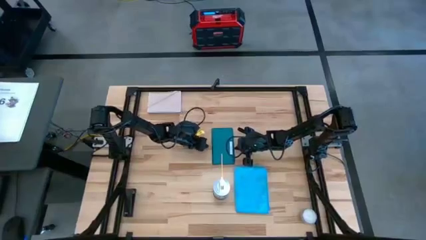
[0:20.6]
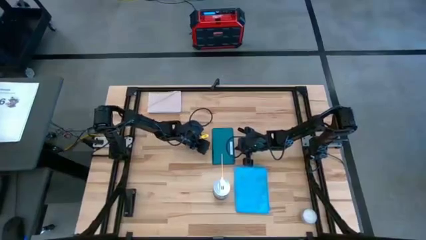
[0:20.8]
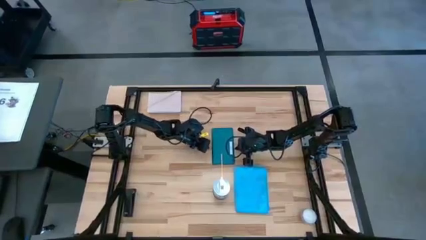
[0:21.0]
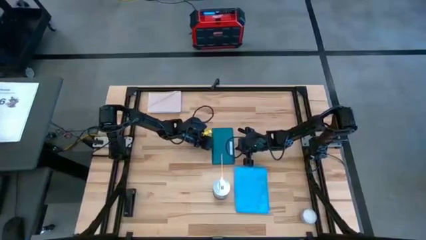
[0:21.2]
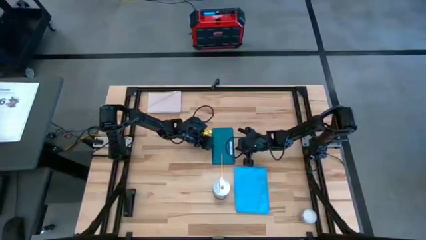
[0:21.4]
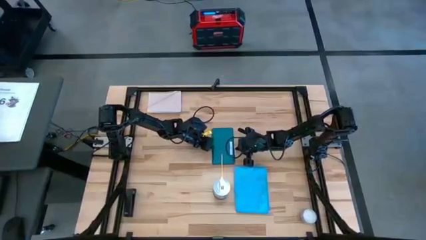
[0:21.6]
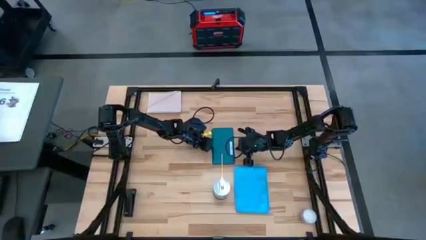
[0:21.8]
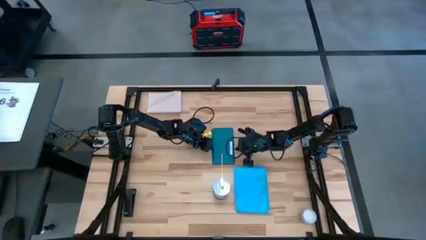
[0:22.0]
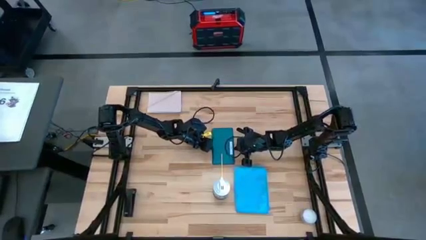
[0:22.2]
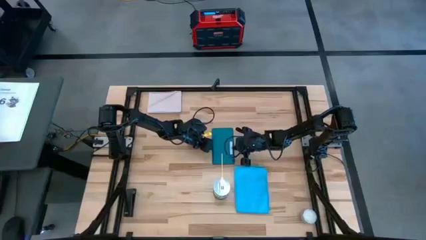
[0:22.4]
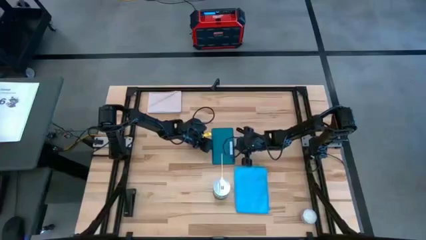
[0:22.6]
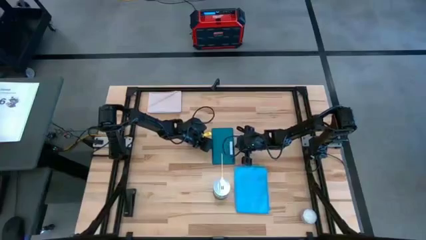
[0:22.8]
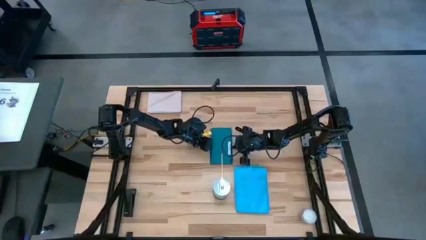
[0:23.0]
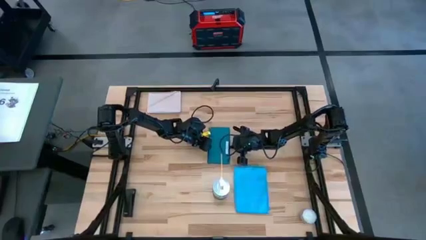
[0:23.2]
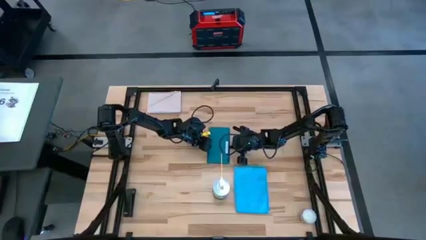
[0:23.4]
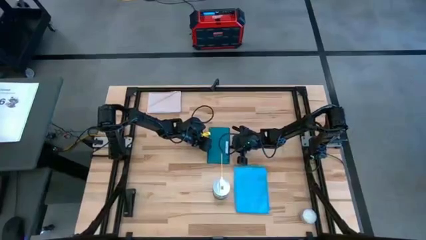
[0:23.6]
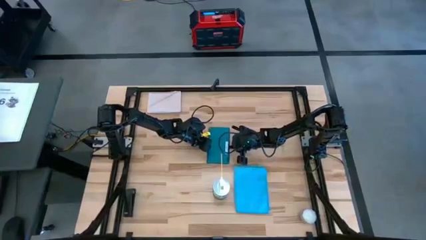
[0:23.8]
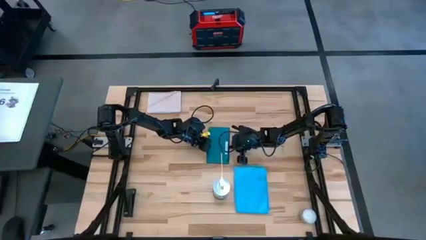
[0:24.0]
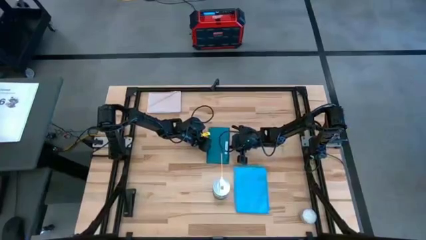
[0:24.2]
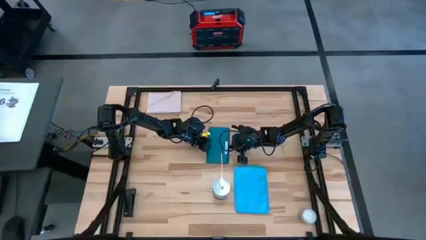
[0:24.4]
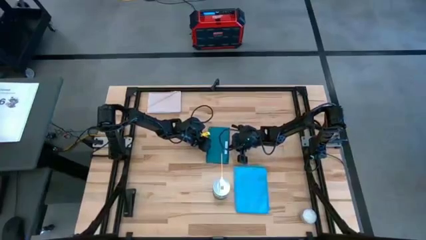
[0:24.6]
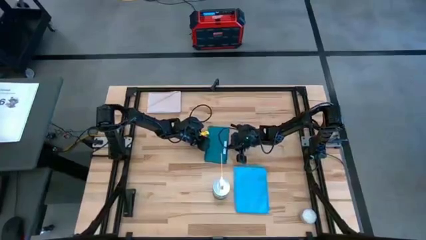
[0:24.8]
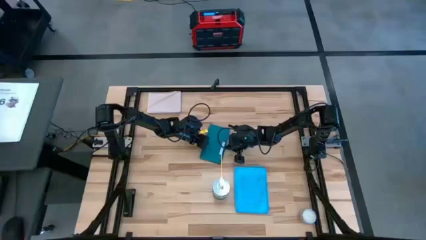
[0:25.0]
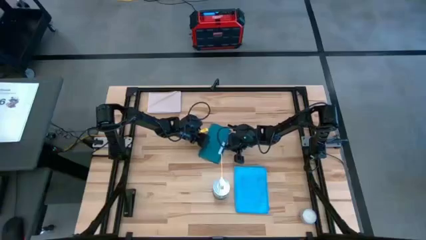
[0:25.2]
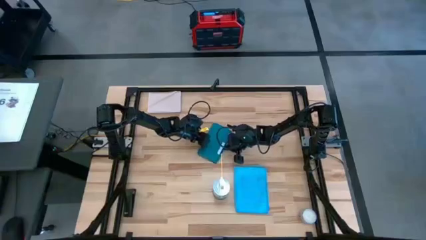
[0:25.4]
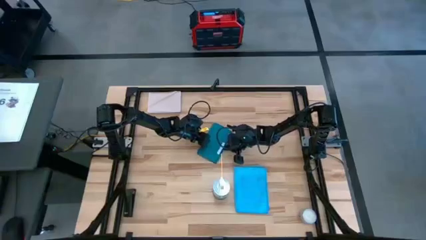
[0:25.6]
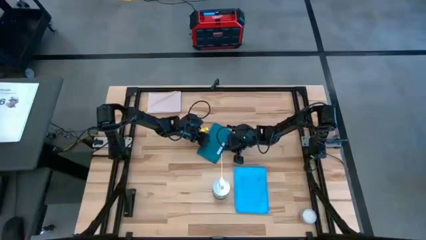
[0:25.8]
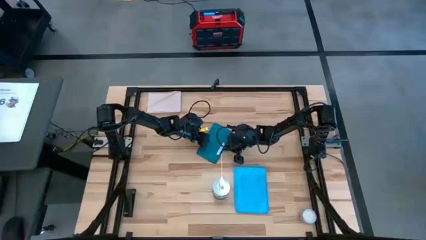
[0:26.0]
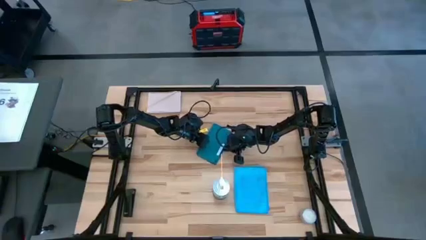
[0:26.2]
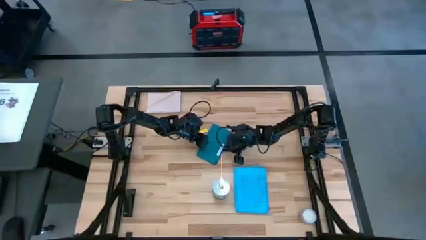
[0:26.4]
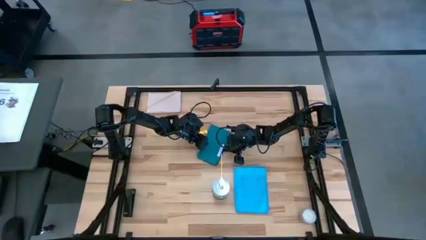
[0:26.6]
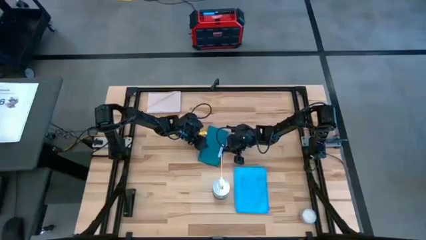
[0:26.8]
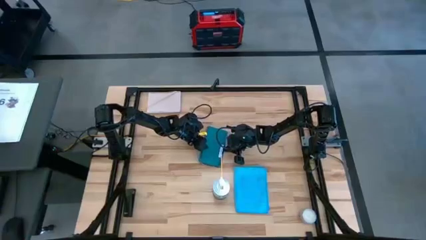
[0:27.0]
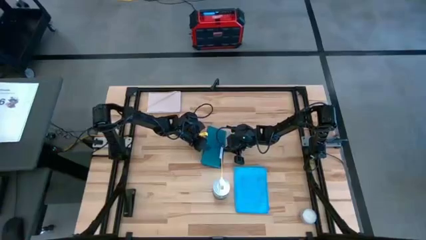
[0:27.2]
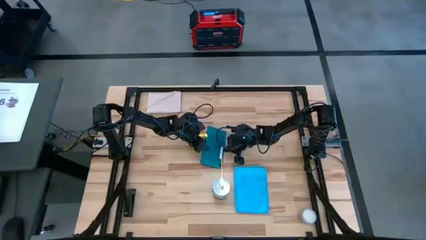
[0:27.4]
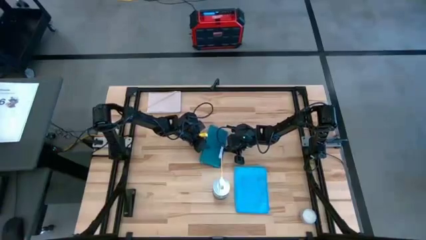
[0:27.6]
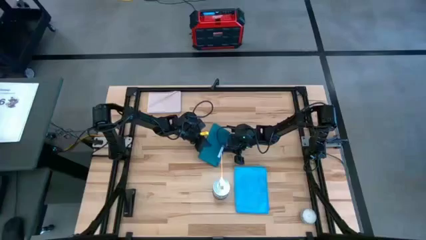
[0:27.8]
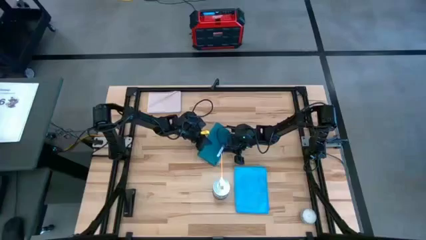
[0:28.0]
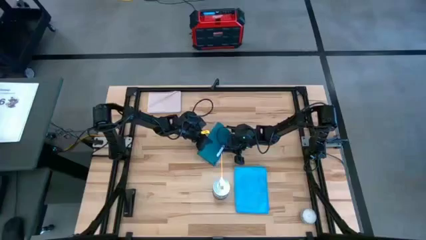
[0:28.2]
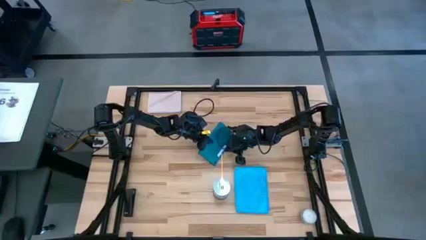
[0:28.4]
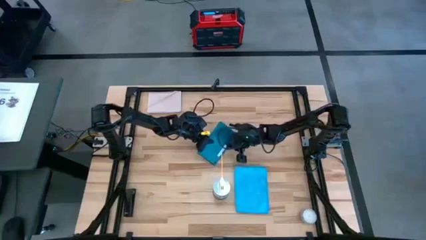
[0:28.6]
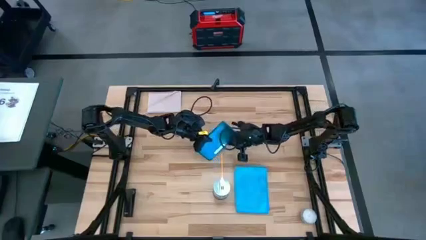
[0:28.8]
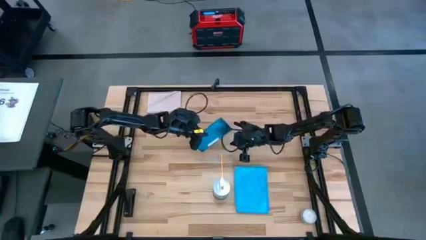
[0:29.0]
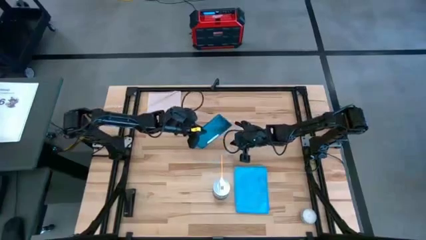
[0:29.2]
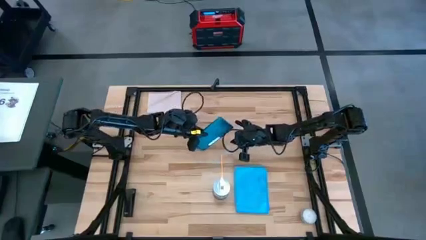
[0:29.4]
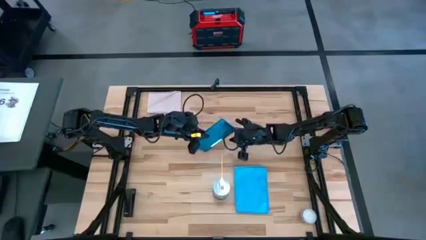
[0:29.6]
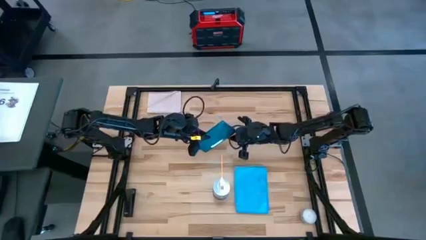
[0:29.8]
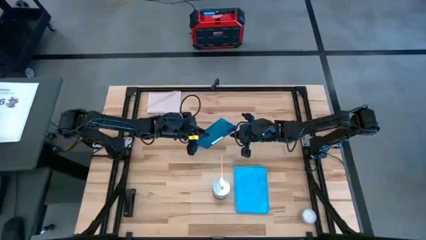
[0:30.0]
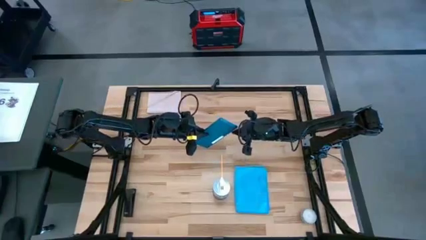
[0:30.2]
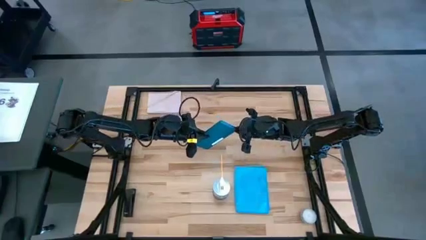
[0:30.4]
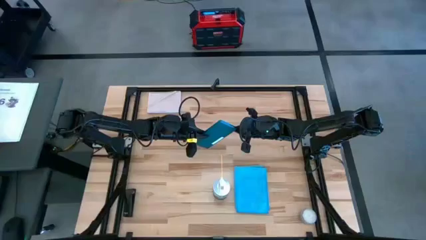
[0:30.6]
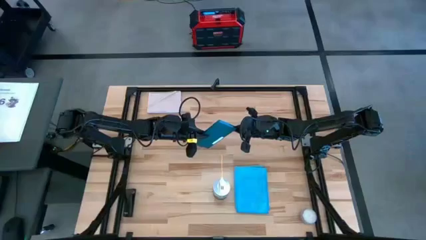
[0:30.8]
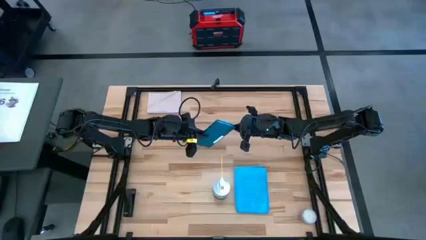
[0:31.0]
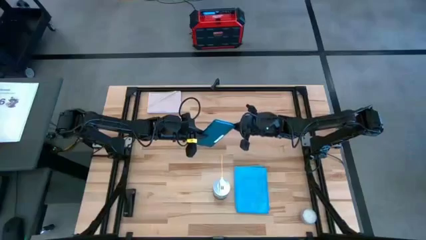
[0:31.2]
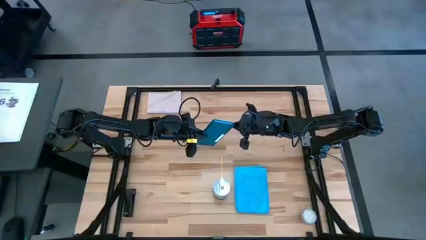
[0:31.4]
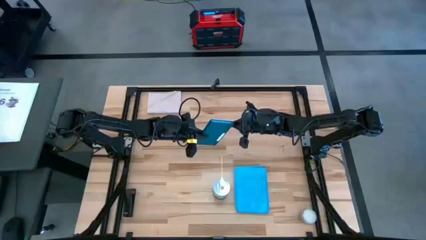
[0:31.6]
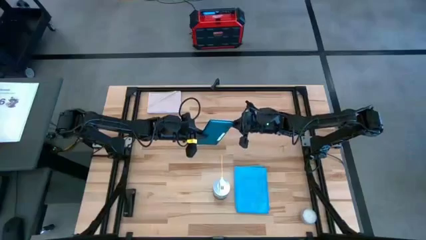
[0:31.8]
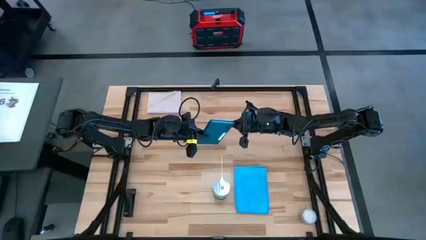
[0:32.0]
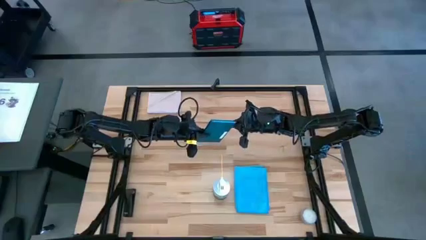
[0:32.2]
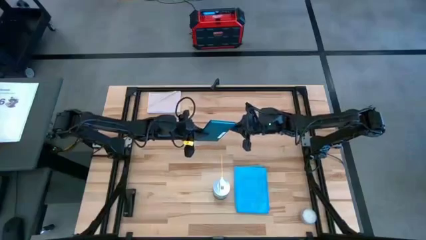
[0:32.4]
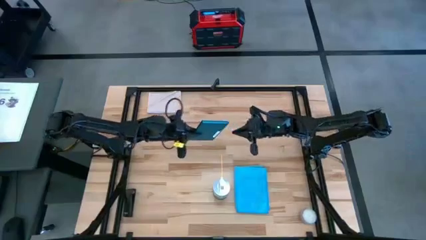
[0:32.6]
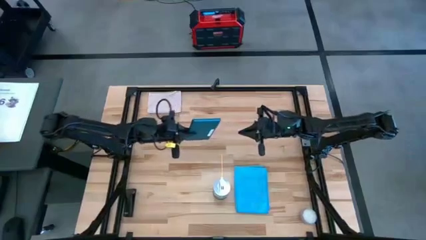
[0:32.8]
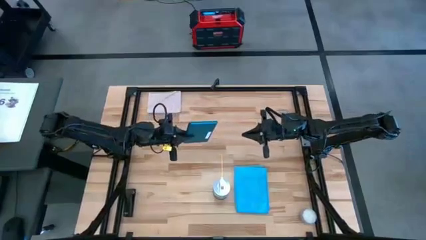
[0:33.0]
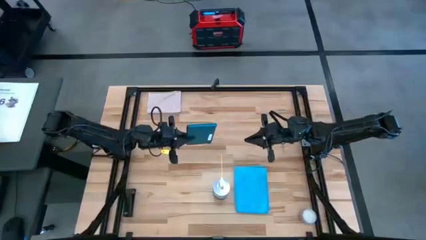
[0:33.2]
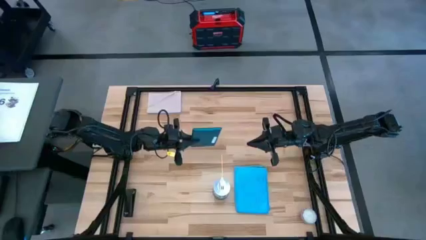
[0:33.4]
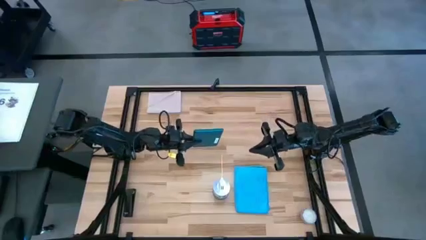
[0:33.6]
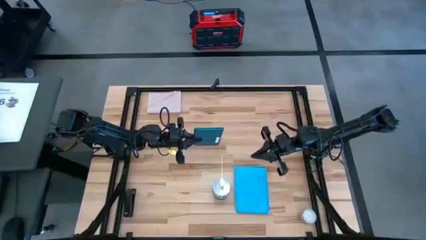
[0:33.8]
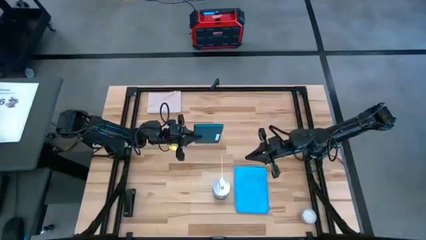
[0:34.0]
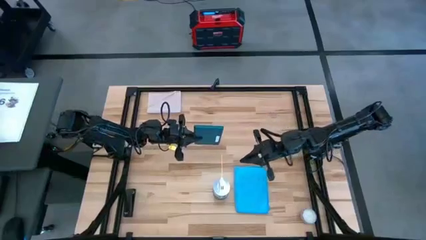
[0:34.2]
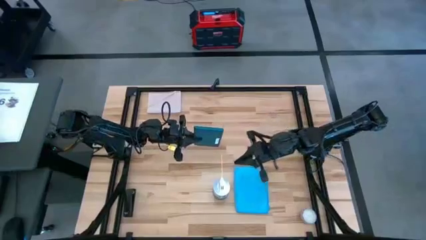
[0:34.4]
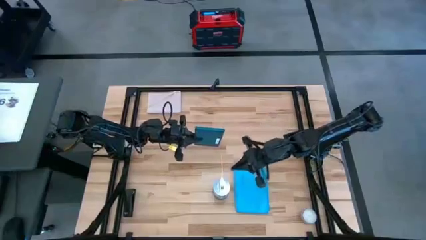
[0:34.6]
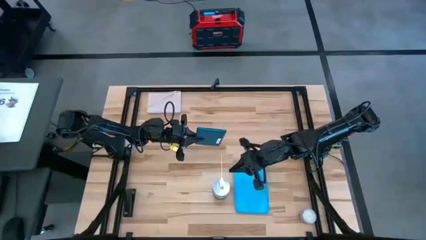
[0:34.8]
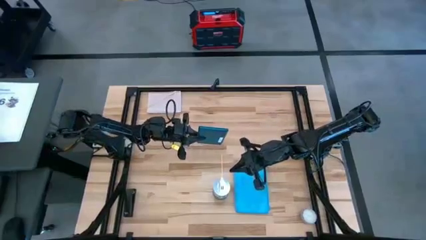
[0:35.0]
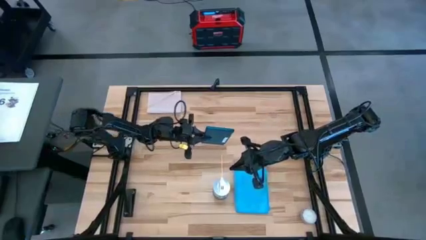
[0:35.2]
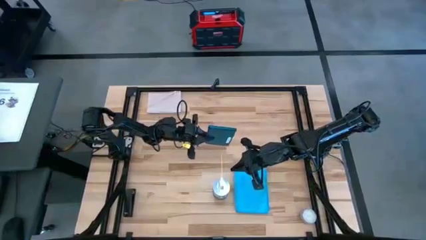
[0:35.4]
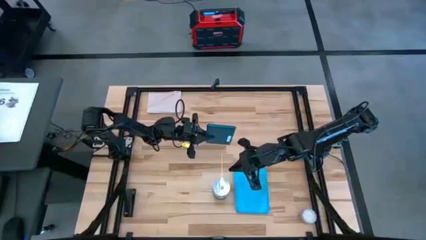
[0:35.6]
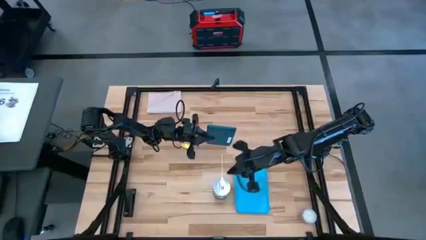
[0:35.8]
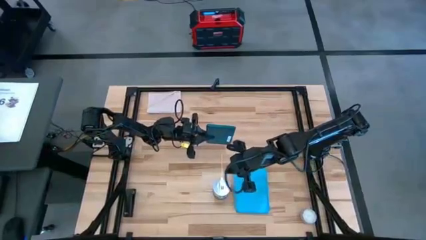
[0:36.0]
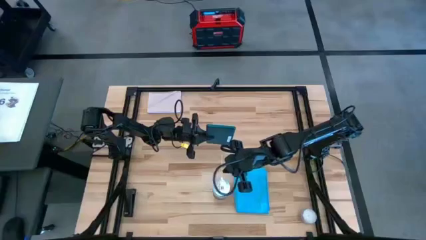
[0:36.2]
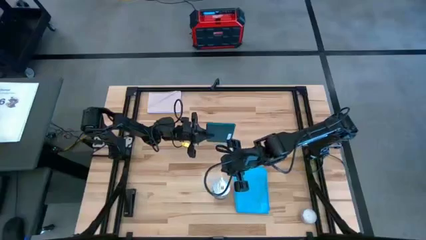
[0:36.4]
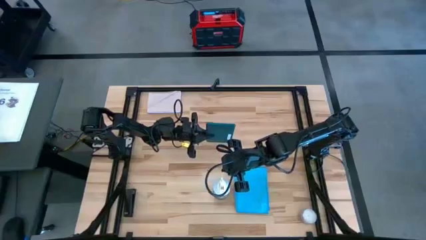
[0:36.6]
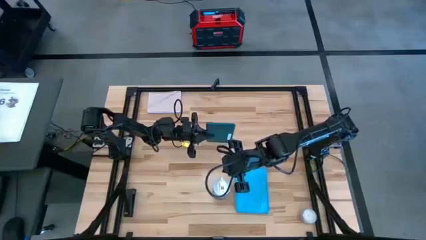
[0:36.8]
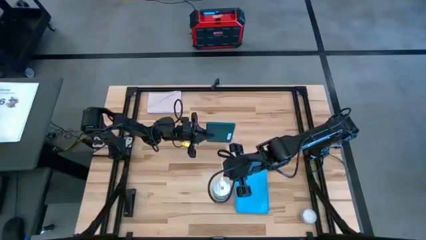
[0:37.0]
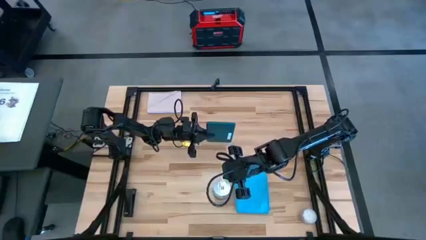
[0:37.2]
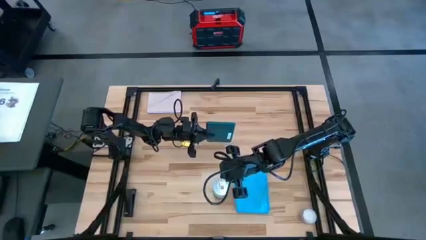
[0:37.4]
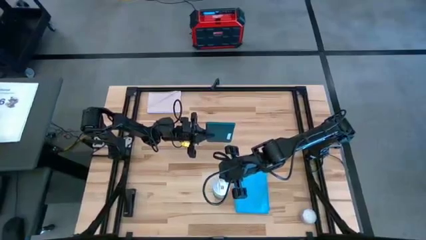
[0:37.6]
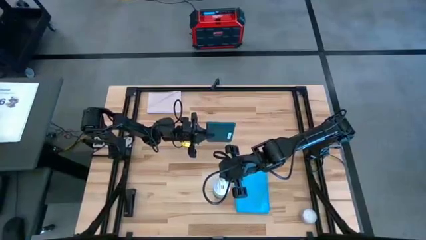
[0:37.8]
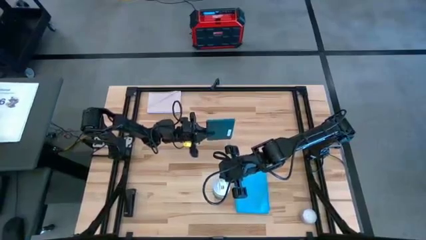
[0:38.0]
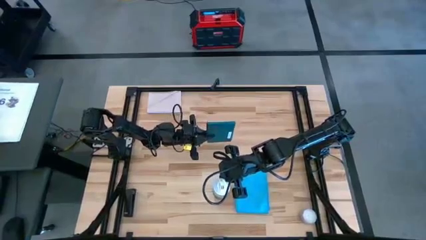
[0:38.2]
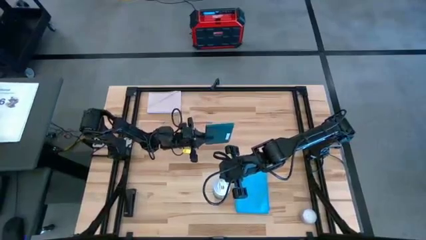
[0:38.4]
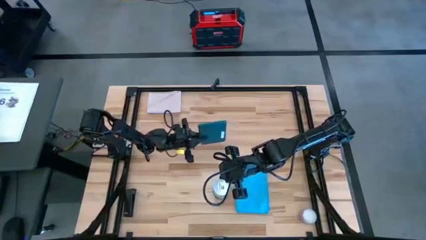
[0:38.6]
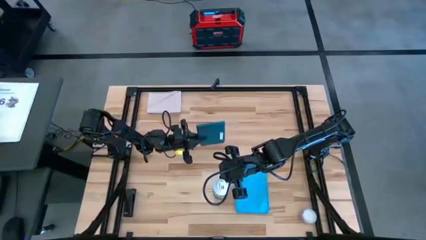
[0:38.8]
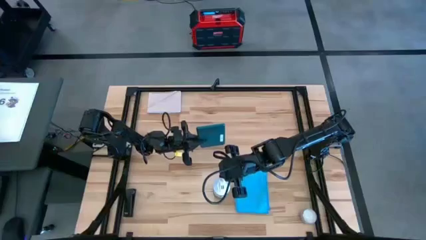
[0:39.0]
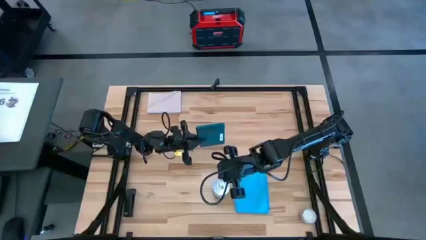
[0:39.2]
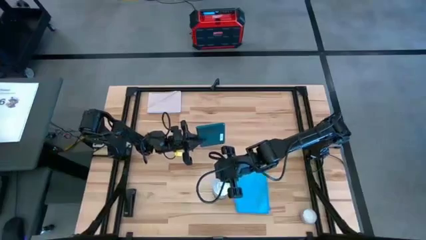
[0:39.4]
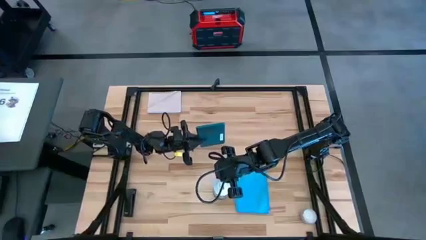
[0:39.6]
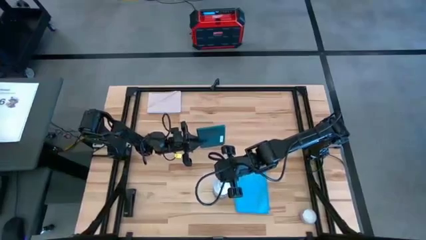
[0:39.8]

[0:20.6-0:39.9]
Task: Apply microfiber cloth
Spray the back of the green tablet using the white spray bottle
